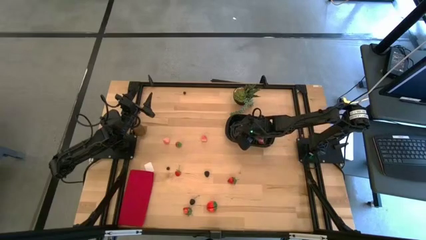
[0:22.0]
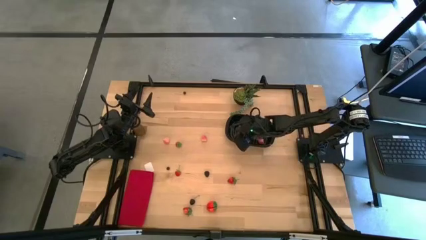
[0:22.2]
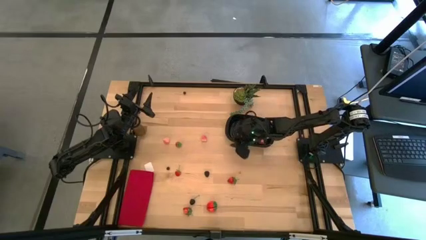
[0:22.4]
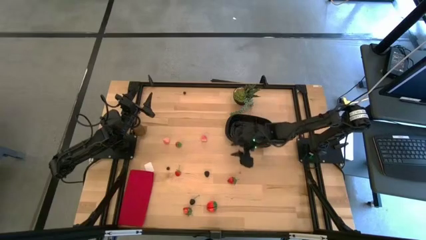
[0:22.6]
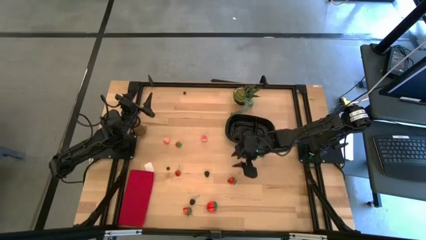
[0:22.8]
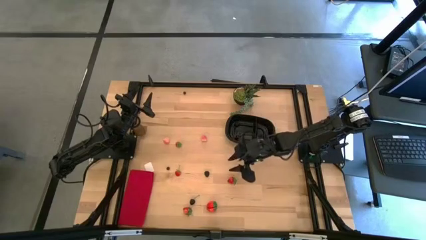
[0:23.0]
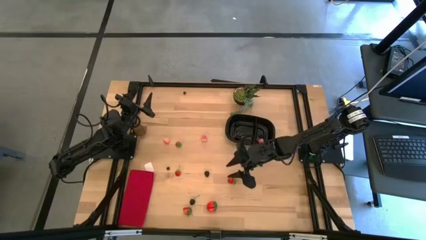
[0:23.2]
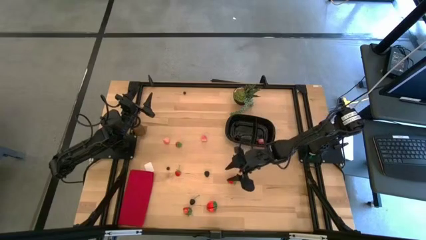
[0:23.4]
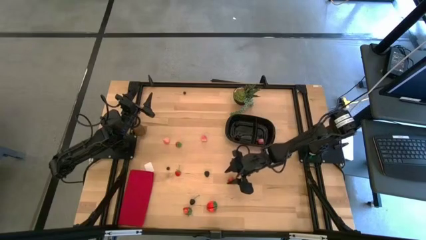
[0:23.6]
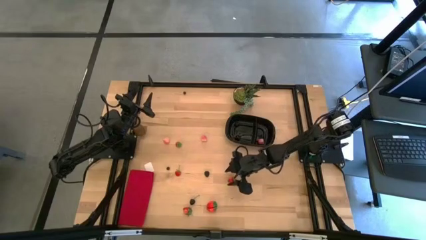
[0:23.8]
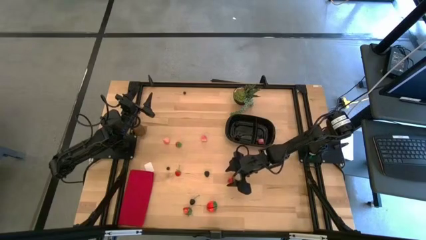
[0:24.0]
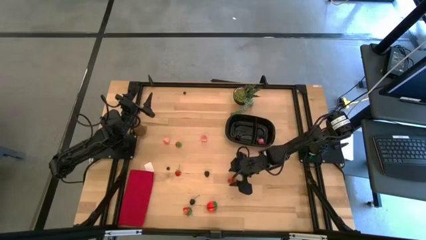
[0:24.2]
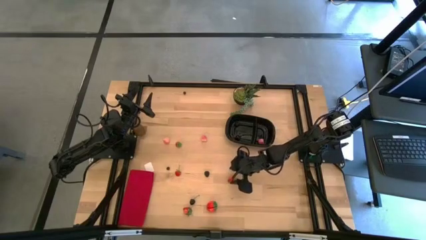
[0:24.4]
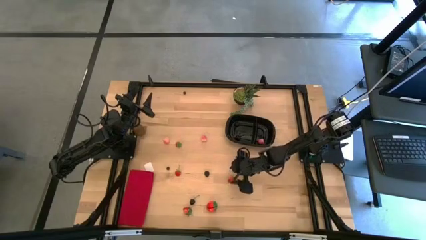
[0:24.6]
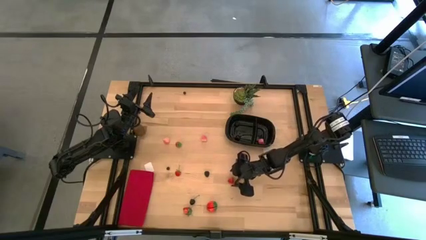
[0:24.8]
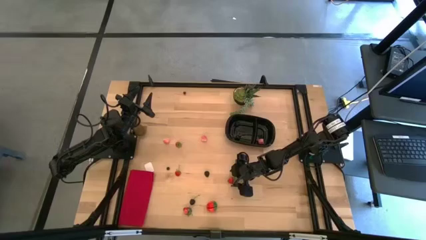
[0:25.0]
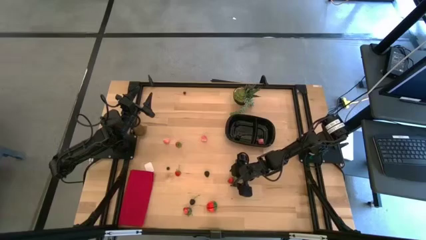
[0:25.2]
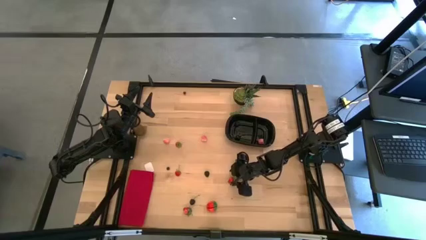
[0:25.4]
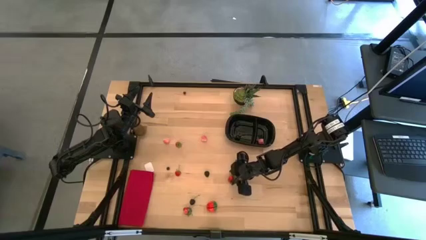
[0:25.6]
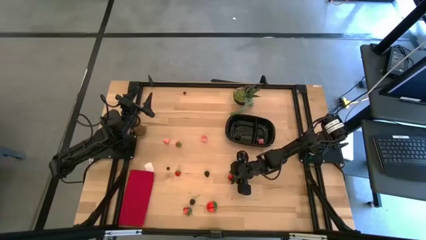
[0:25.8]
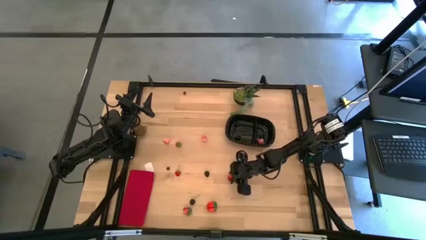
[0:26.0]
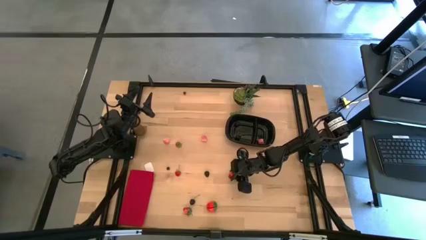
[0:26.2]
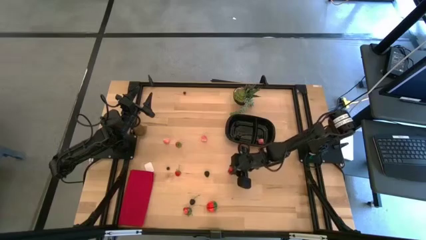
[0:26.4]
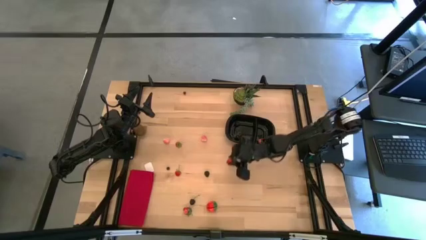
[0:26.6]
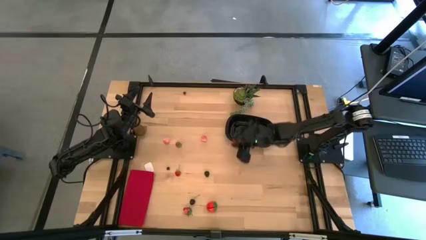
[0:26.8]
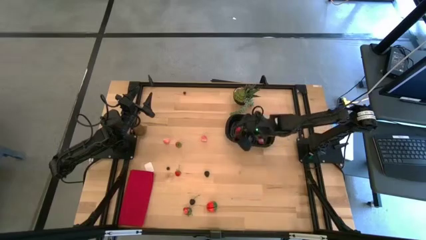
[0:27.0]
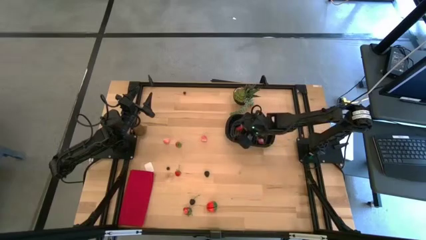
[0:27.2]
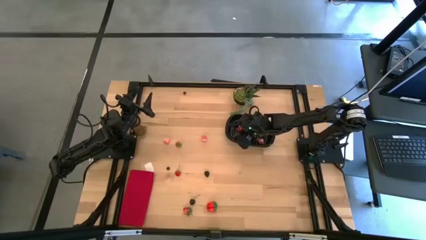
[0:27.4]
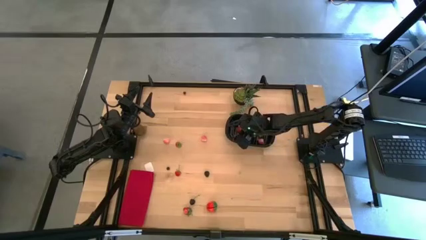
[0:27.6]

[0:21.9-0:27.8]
Task: Pick and placing Produce into tupperware
Put the red strawberry into the of the black bin

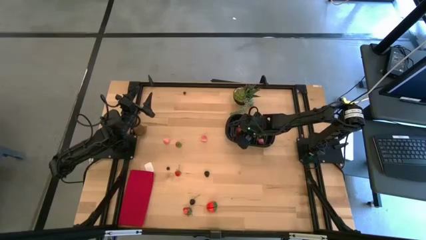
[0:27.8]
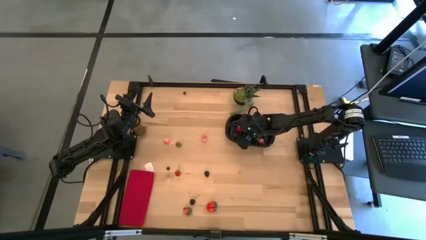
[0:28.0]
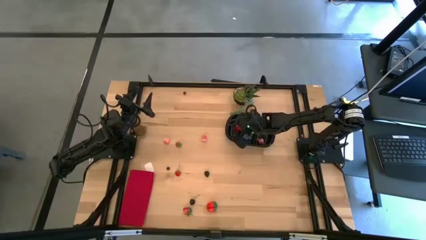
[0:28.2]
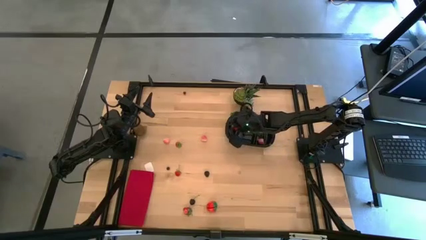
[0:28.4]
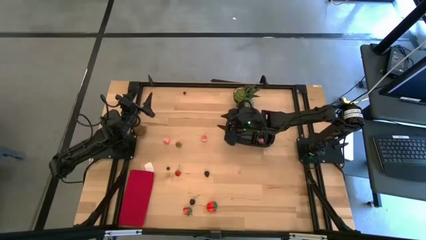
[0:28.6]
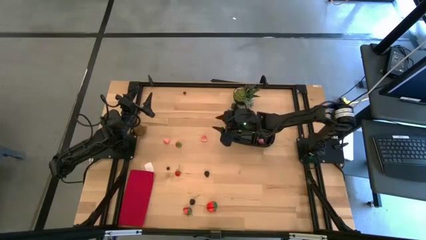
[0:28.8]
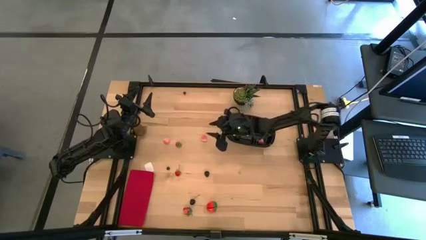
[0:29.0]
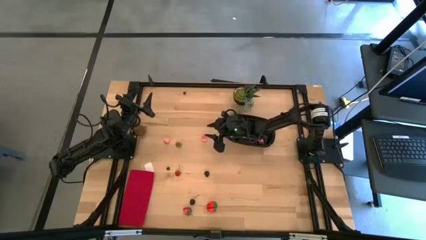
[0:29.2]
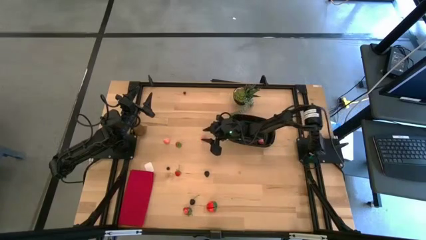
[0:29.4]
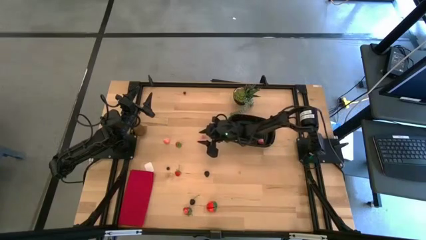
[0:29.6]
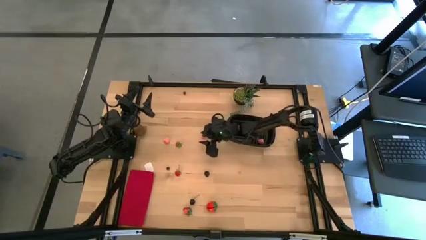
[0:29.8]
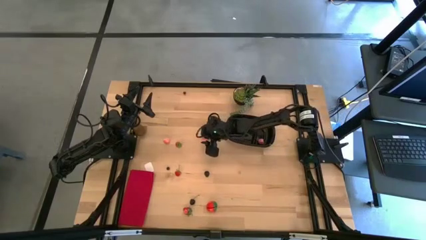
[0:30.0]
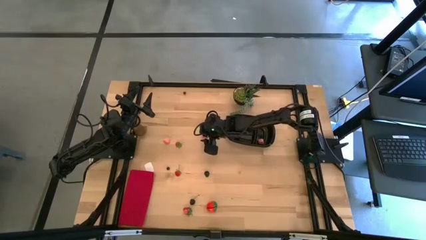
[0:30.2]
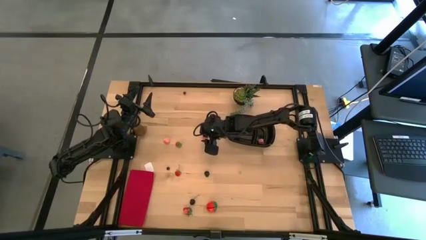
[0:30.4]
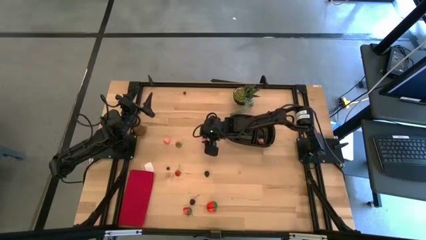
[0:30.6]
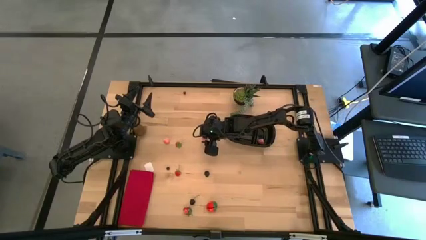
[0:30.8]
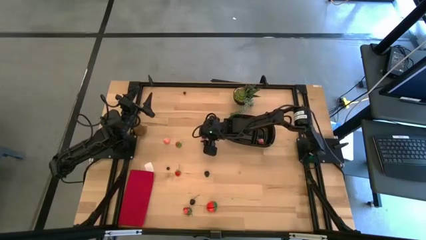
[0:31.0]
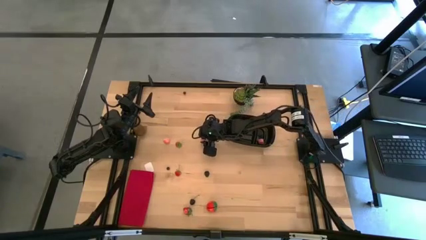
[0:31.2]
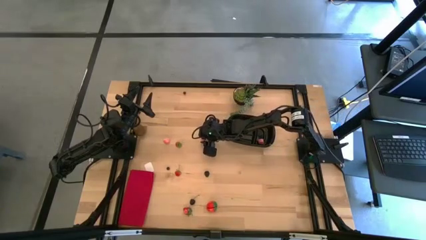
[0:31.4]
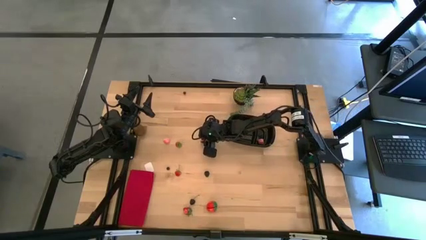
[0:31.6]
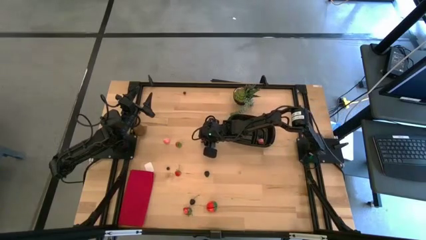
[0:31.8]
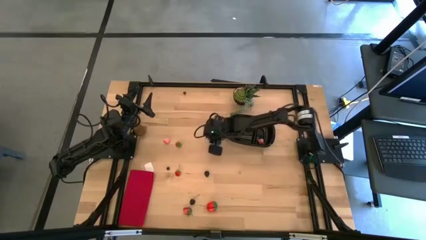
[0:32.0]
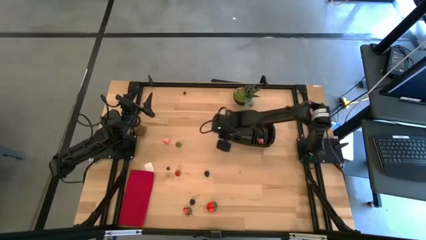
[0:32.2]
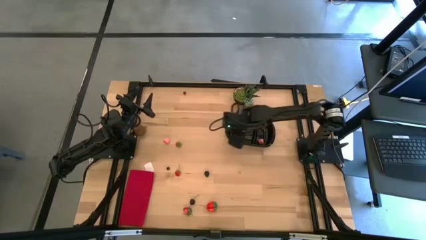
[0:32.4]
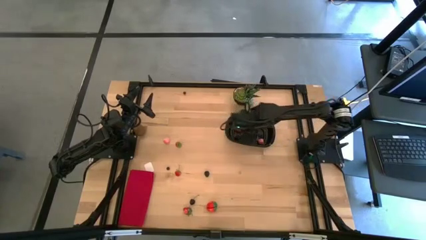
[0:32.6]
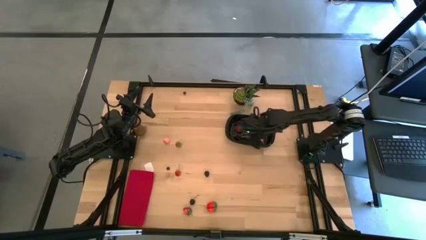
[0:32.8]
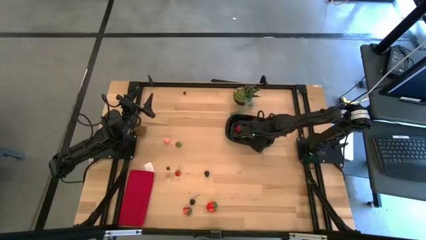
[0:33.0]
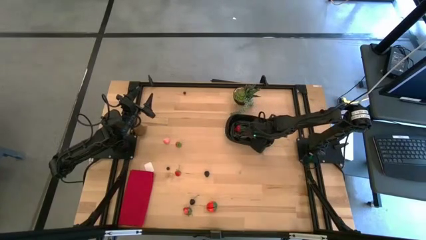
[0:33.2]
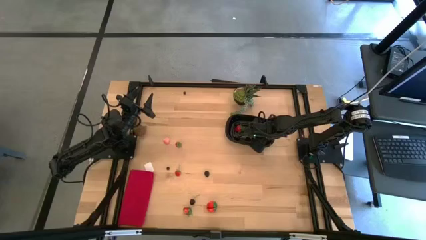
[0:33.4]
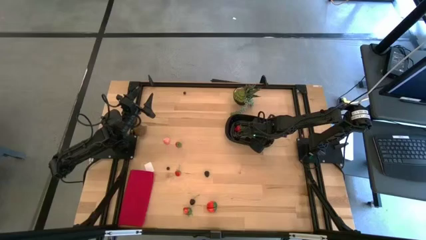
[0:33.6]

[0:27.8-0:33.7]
Put the pink peach into the of the black bin

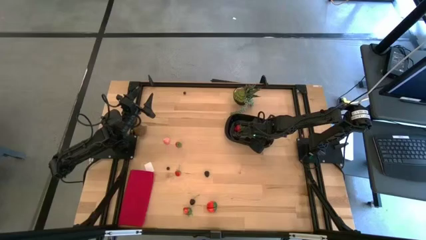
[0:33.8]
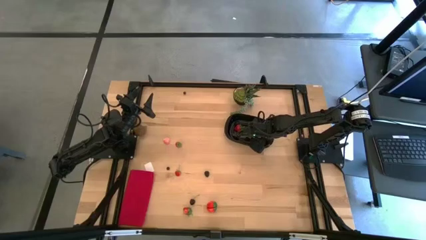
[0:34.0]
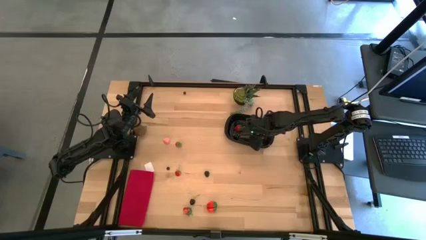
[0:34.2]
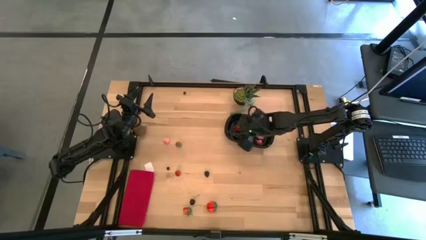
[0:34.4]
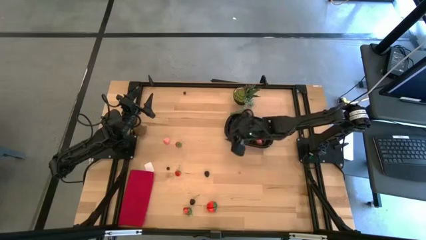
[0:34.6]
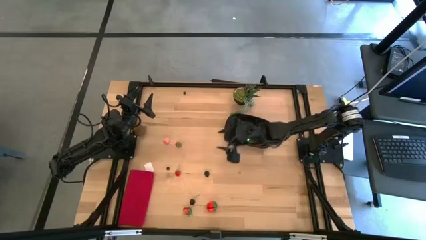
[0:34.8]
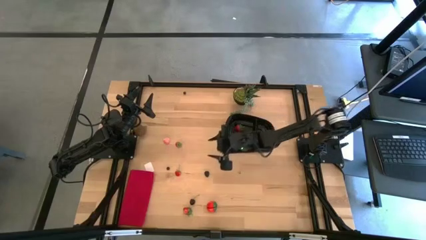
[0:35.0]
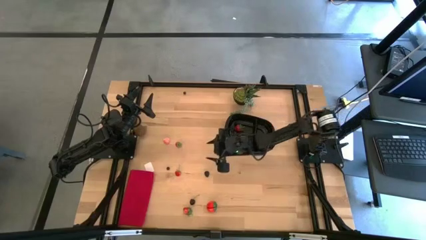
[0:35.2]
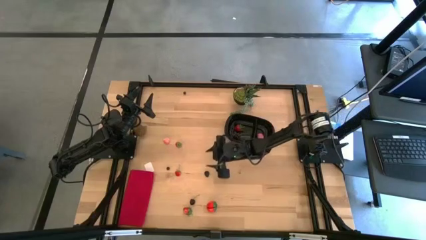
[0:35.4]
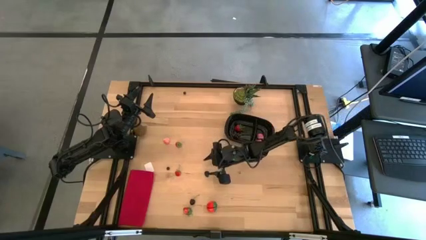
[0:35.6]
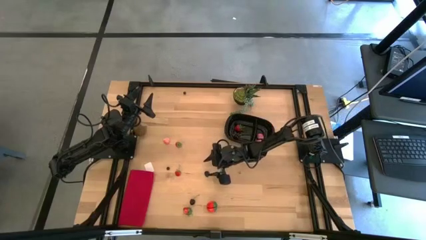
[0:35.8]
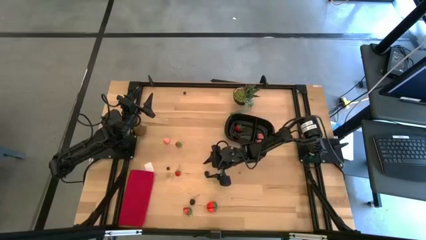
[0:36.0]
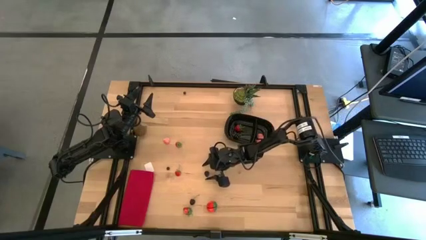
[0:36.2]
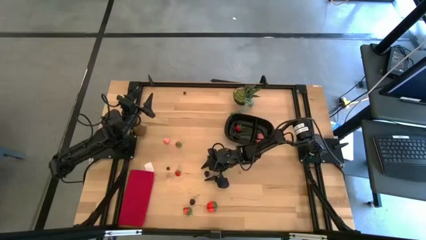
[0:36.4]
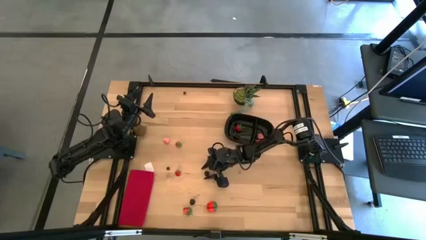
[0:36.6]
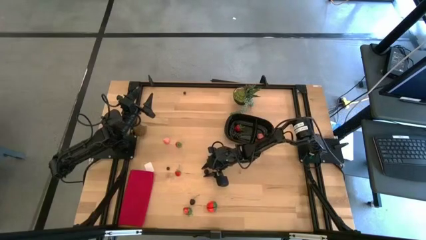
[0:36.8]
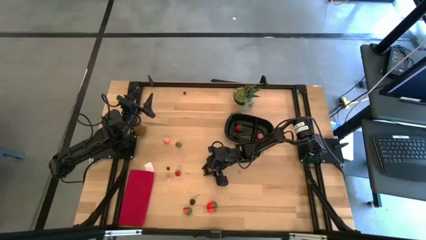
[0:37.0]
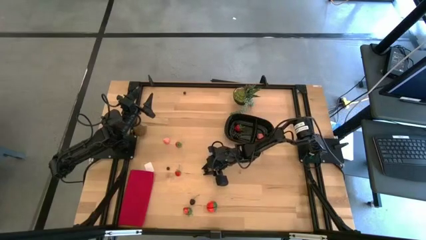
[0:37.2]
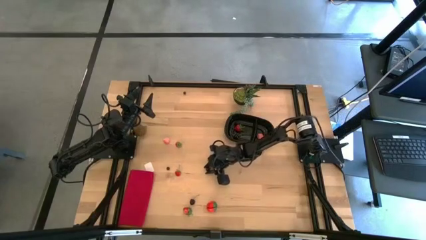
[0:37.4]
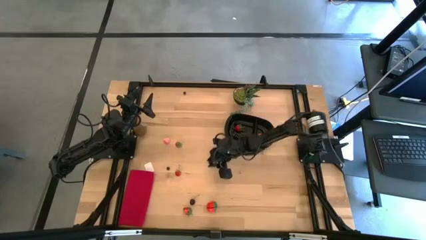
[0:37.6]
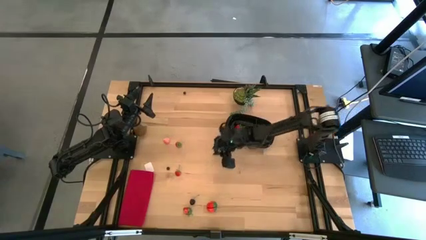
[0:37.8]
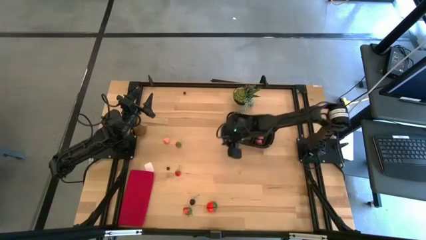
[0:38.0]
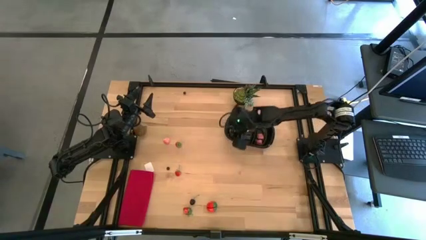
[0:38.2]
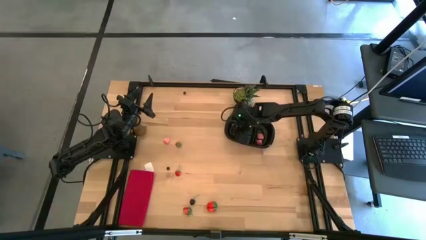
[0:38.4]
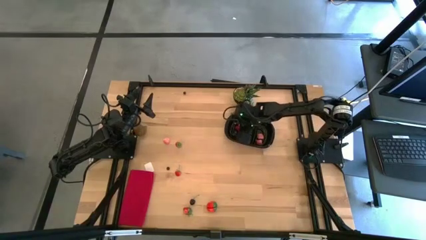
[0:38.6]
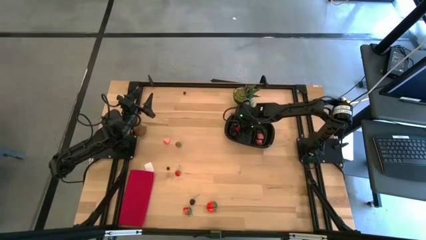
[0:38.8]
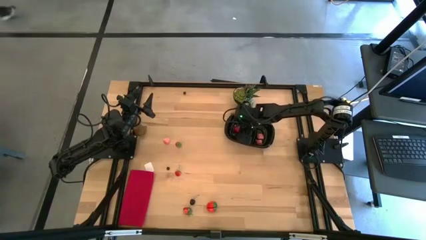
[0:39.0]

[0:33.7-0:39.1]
Put the blackberry into the of the black bin
